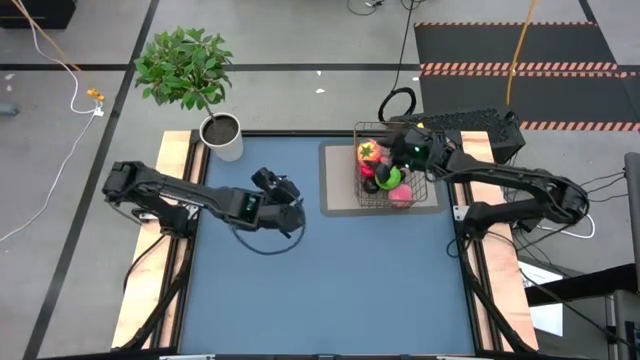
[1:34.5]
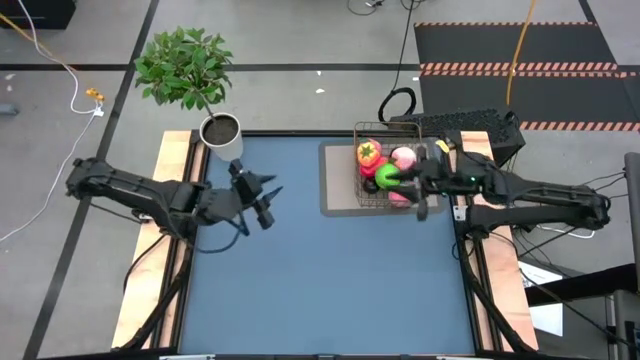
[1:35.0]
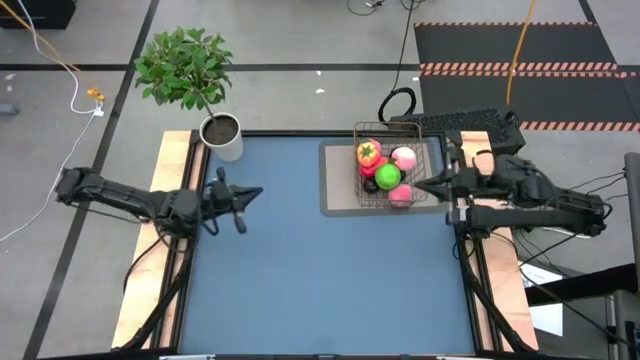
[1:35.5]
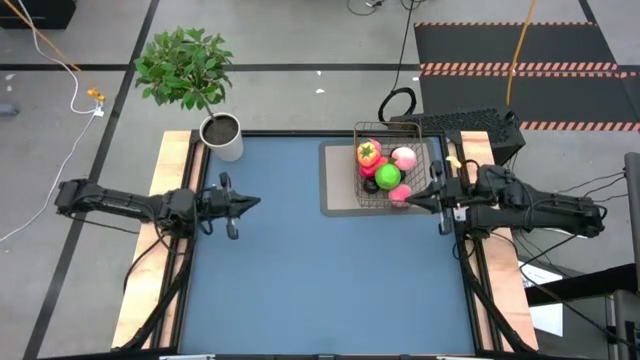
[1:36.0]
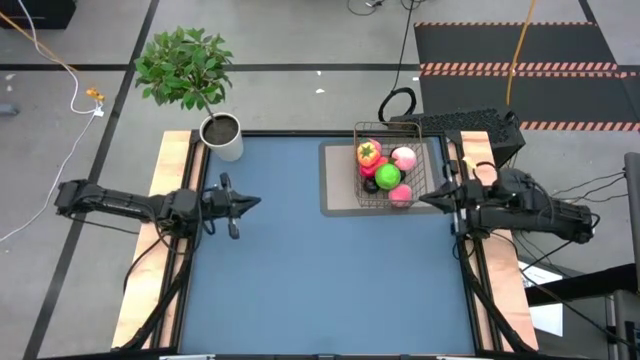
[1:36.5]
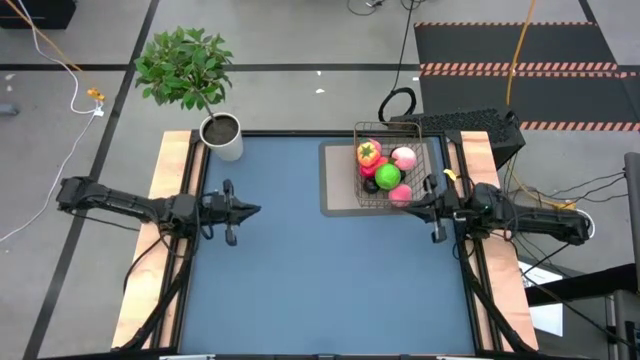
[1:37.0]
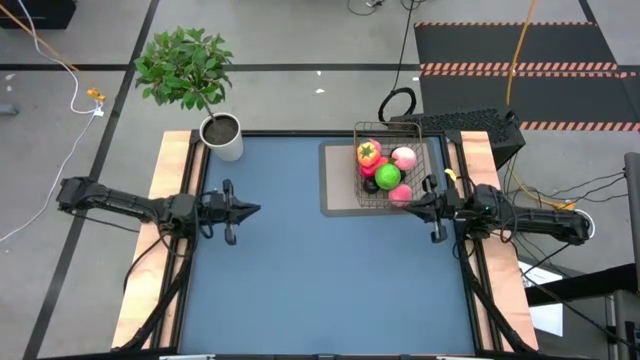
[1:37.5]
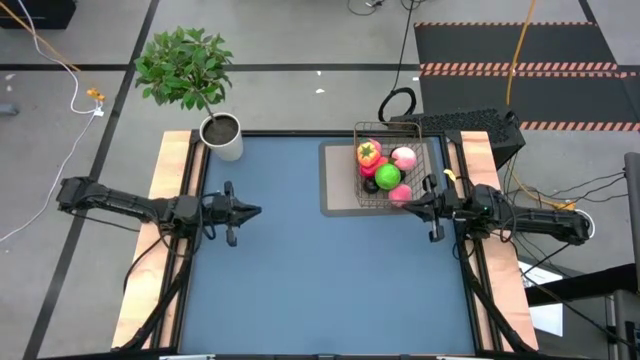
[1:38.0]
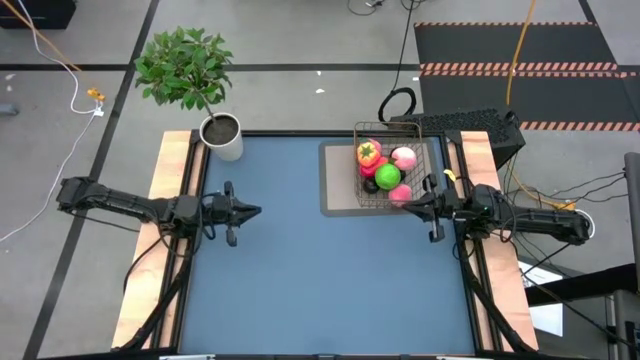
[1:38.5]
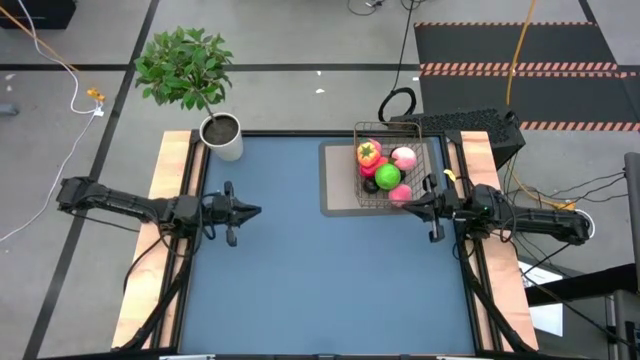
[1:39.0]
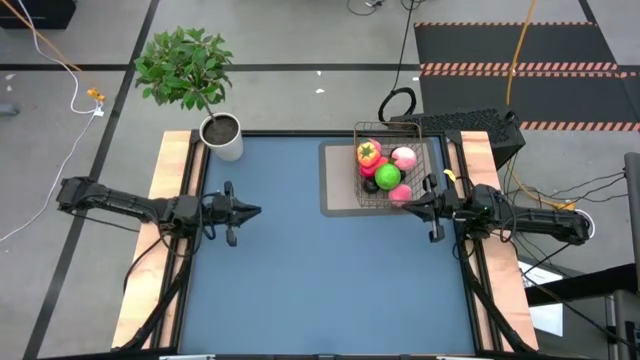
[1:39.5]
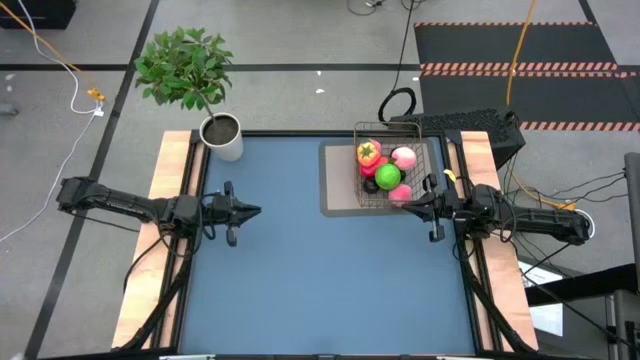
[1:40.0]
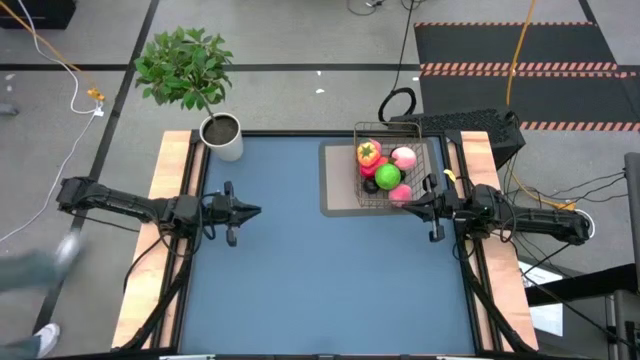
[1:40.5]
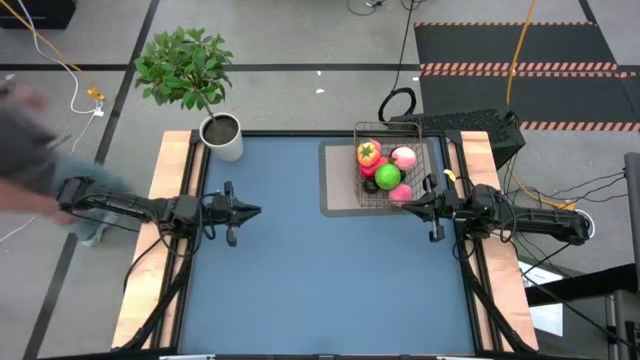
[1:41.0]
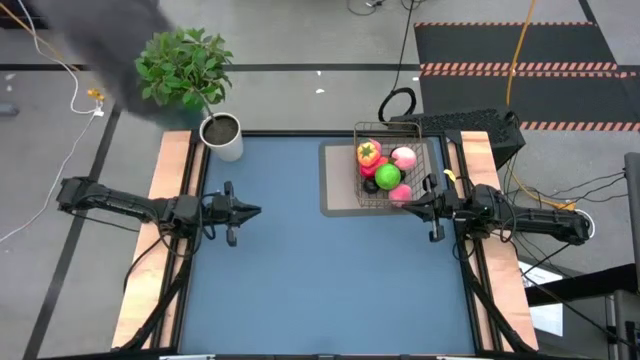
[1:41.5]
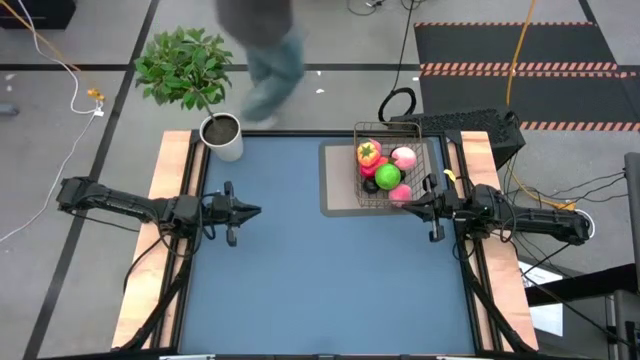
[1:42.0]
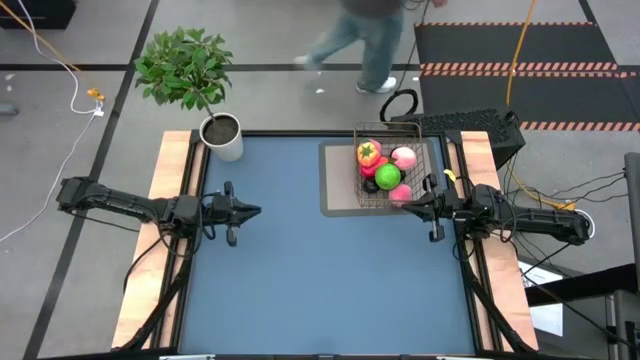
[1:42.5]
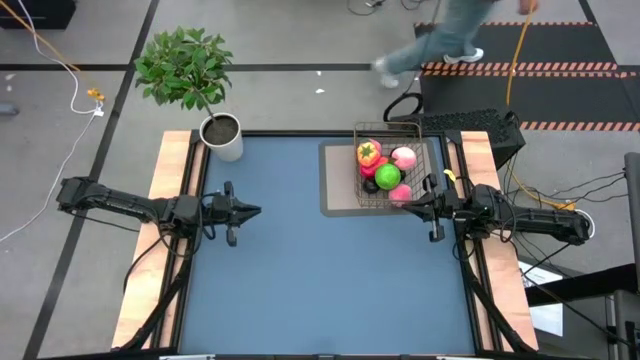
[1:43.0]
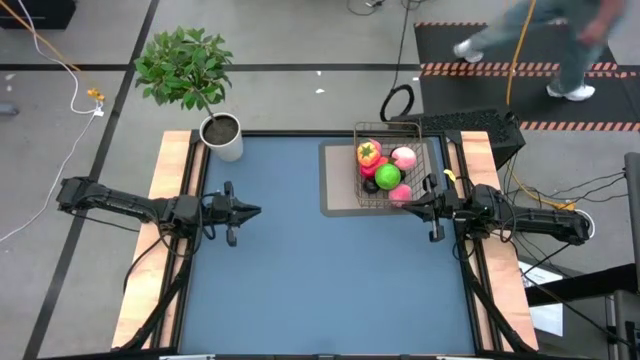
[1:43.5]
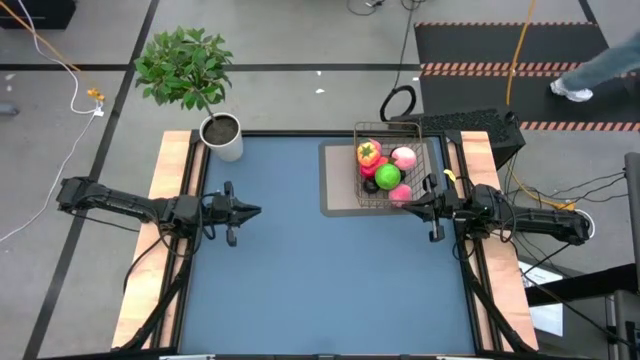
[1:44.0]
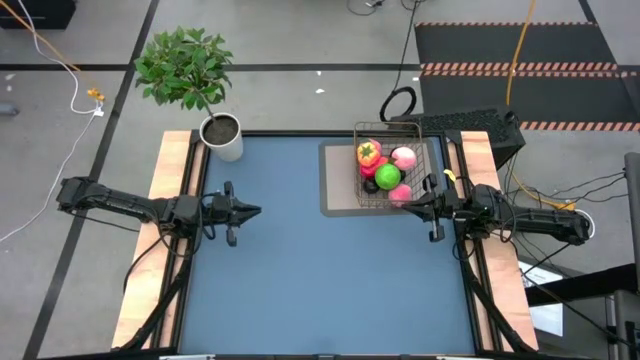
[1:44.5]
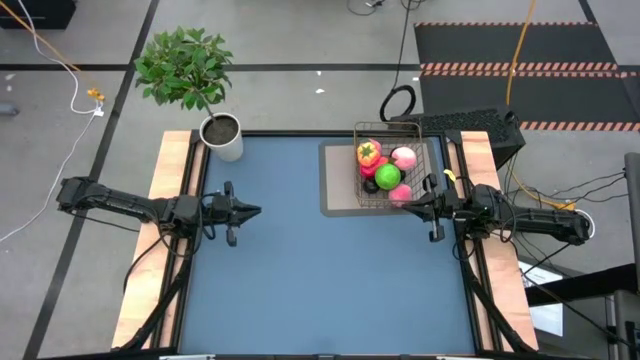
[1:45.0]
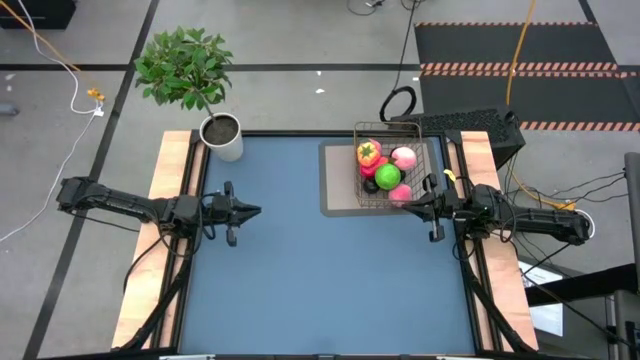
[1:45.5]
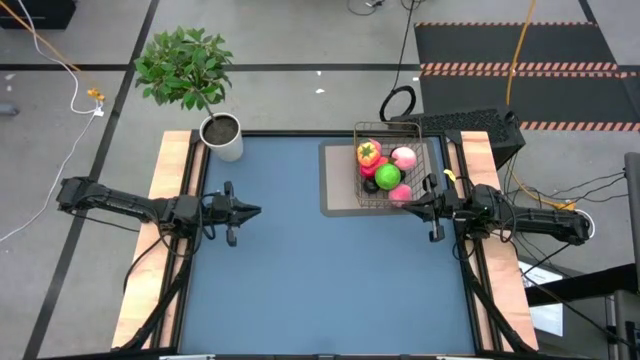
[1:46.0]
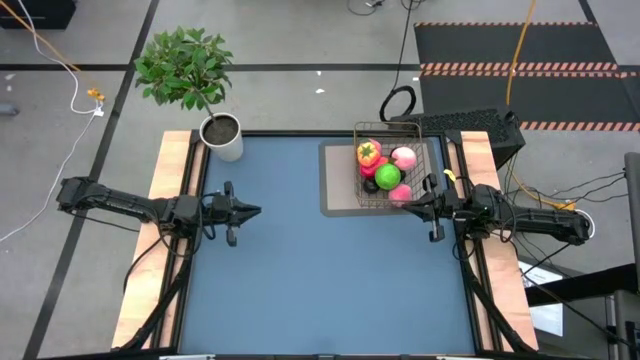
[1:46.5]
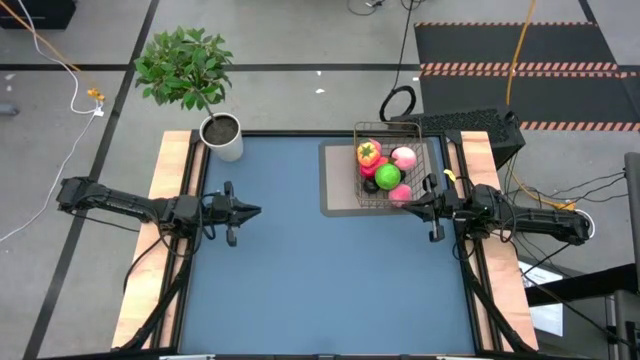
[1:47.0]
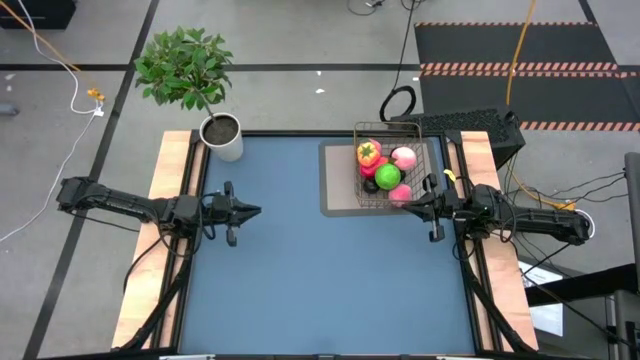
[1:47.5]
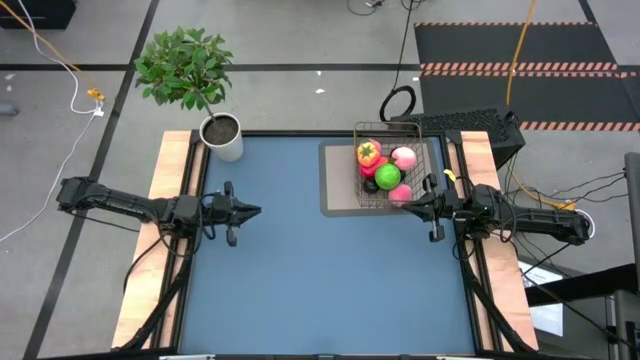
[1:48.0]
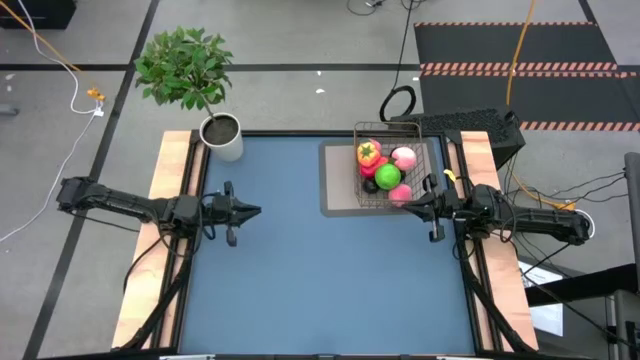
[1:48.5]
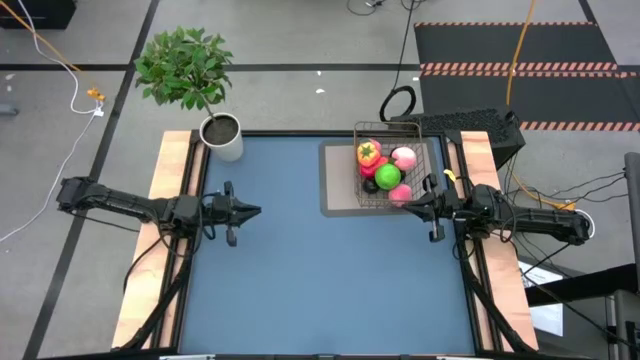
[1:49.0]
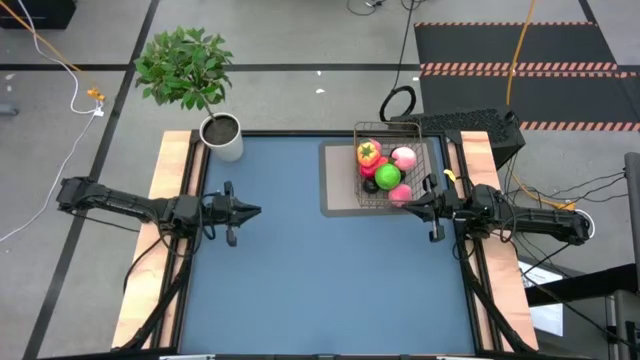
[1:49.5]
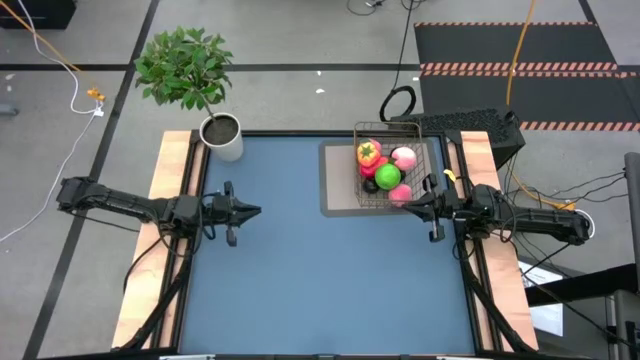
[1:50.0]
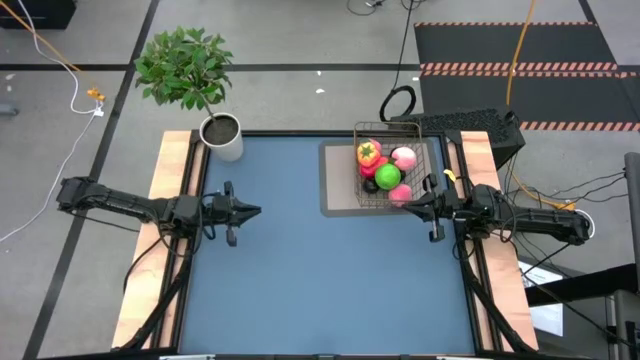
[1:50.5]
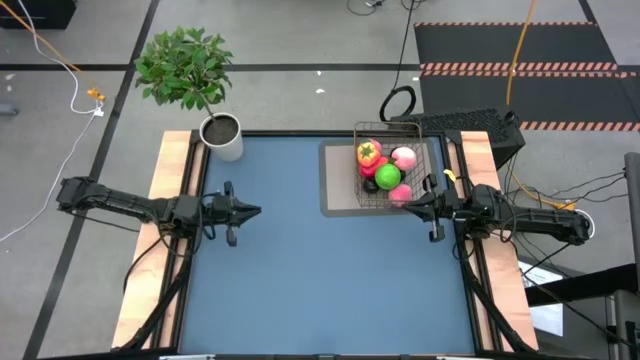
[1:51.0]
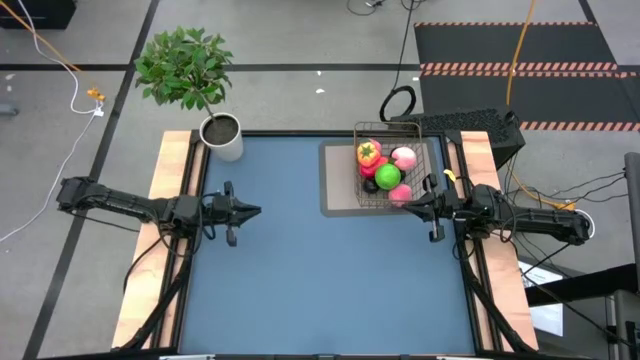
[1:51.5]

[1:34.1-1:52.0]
Task: Build produce basket
Return to Home Position

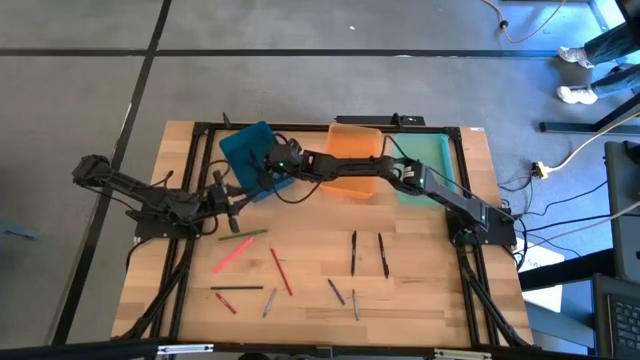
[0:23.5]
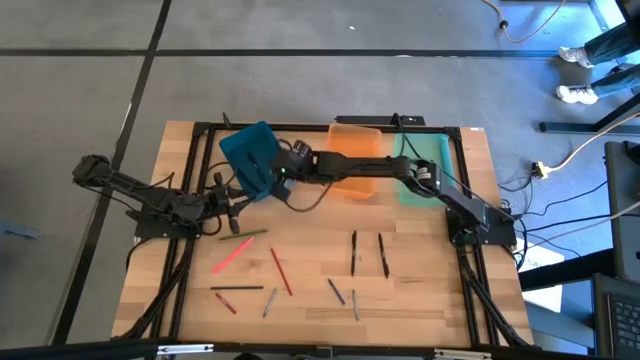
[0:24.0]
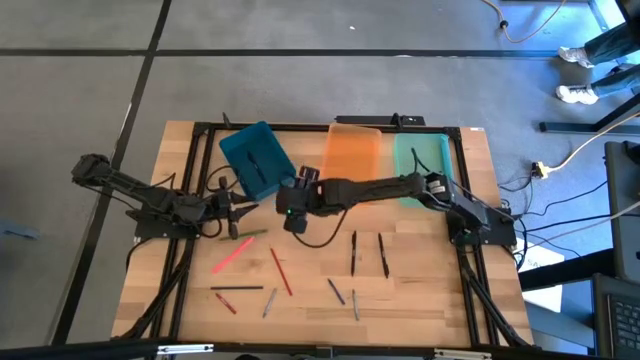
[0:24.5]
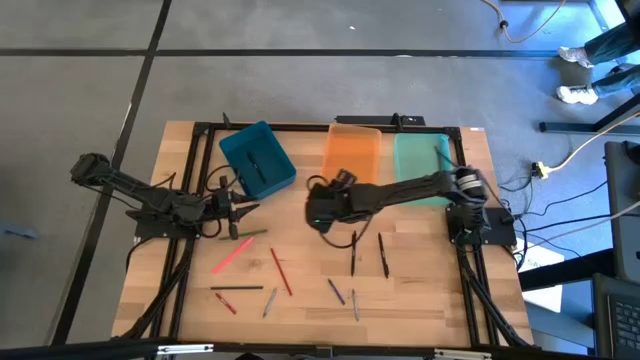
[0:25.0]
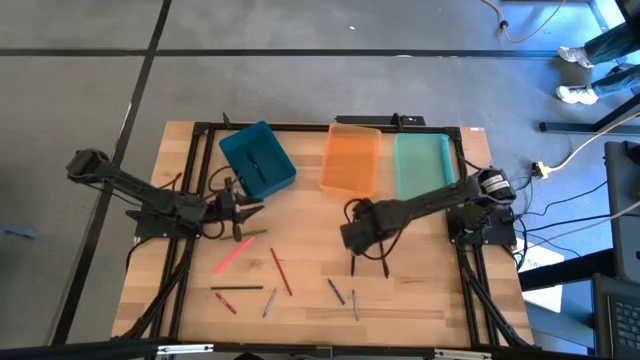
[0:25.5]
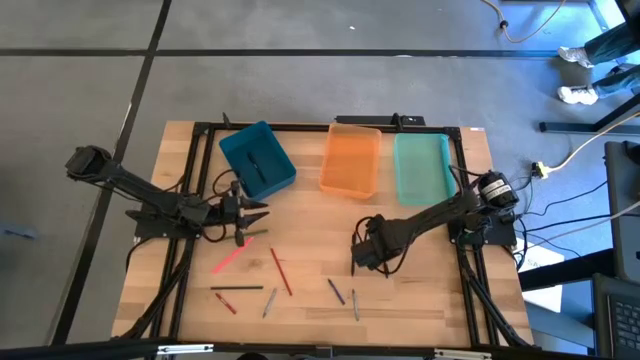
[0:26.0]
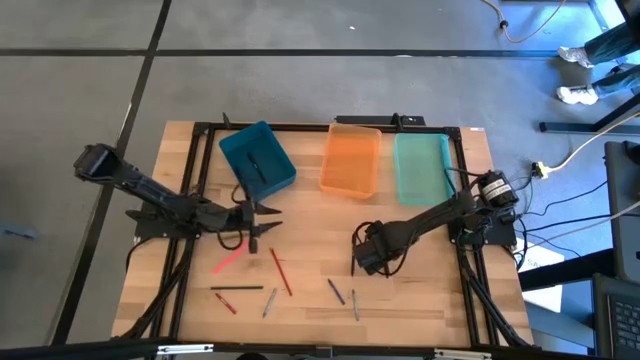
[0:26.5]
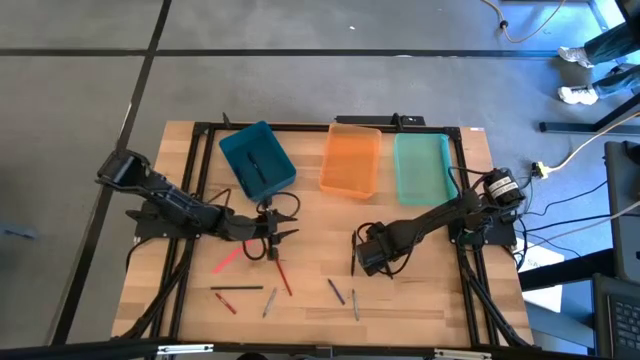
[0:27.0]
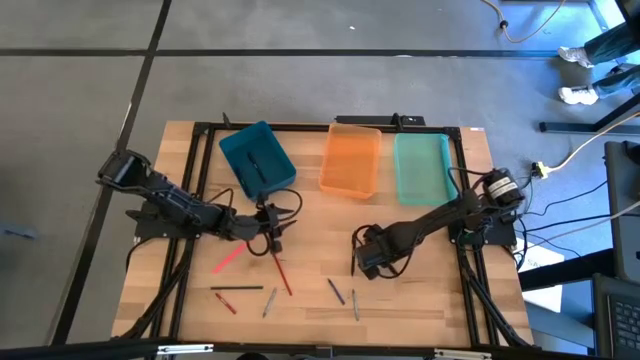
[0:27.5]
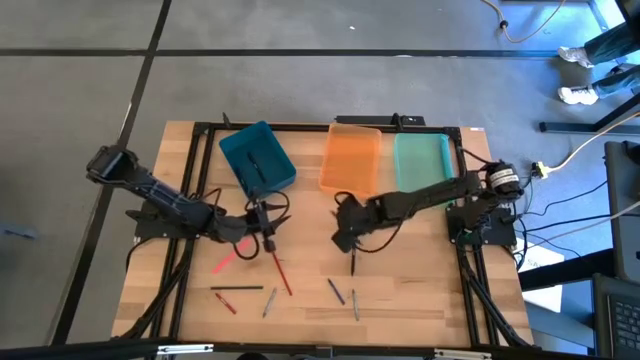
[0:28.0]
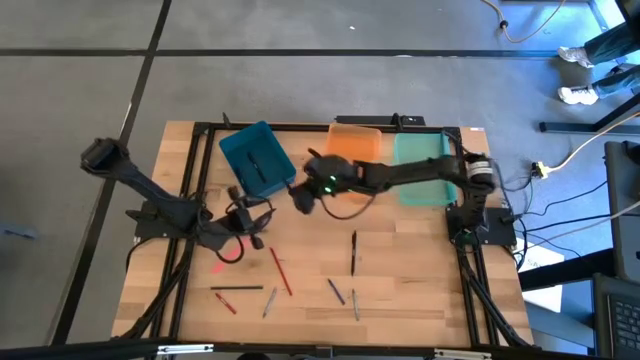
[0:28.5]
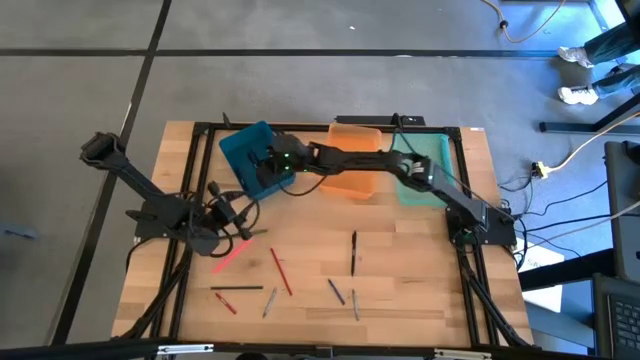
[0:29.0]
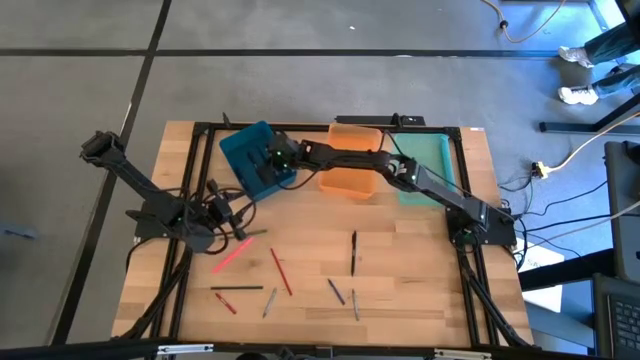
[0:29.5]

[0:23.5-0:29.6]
Task: Sort crayons/erasers/pens/pencils in bins
Put the right black pen into the blue bin
